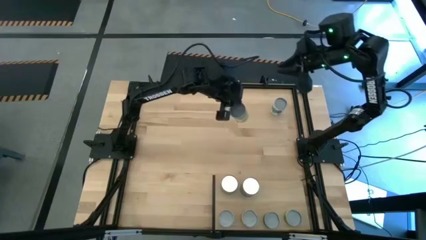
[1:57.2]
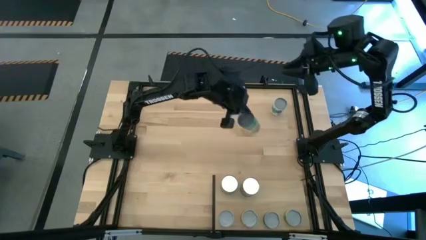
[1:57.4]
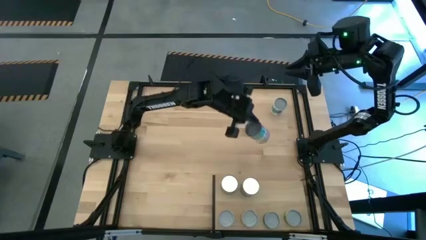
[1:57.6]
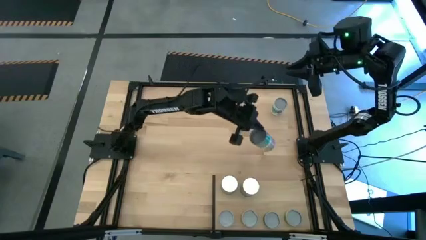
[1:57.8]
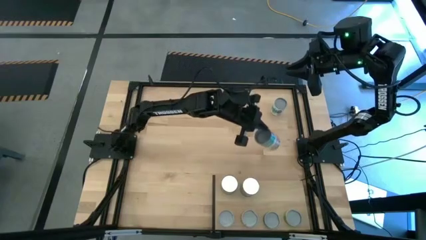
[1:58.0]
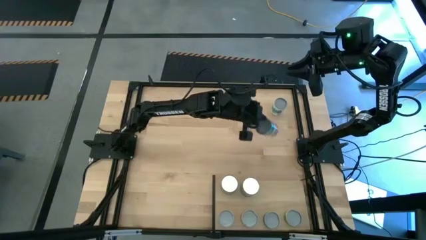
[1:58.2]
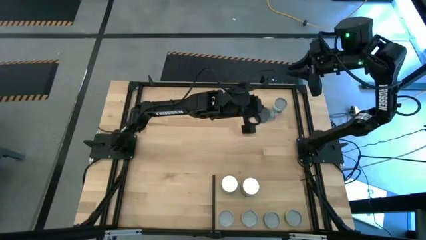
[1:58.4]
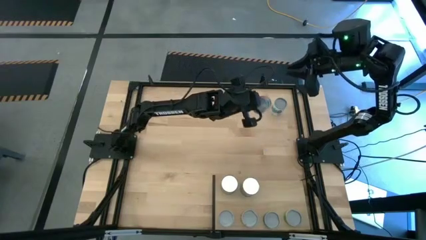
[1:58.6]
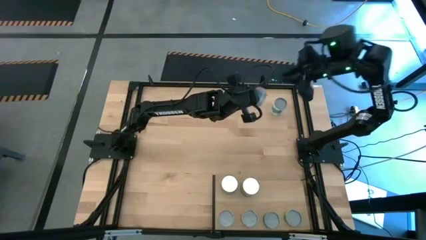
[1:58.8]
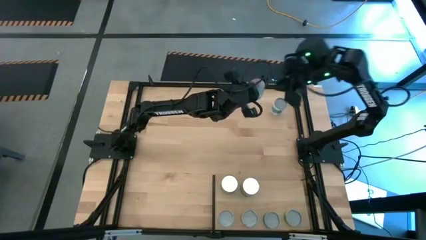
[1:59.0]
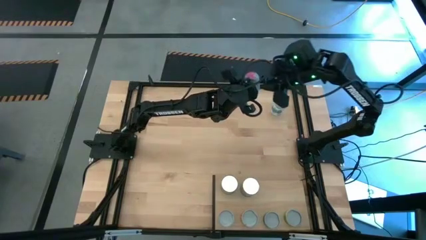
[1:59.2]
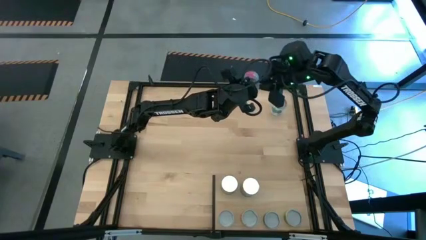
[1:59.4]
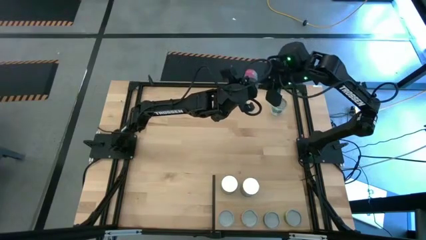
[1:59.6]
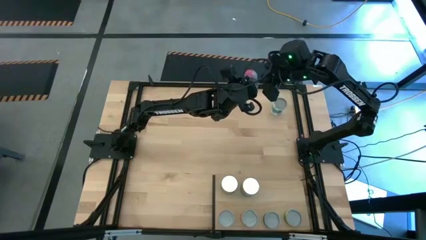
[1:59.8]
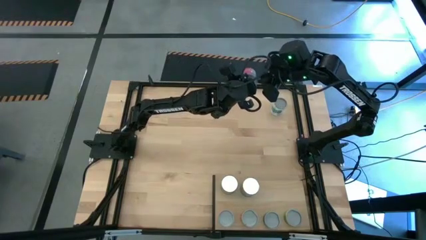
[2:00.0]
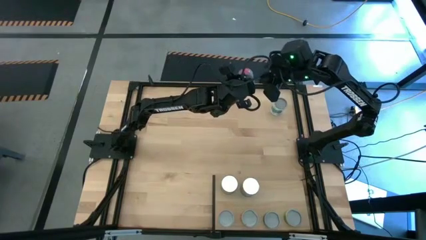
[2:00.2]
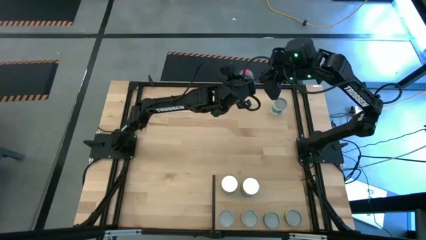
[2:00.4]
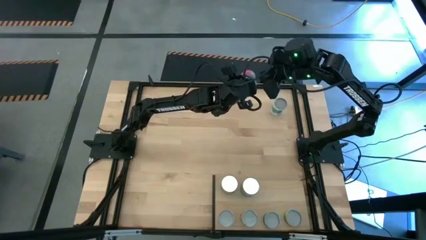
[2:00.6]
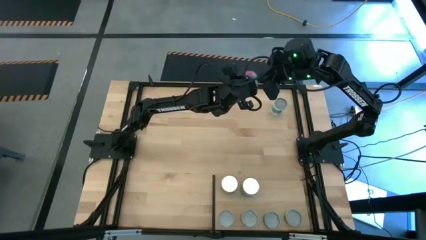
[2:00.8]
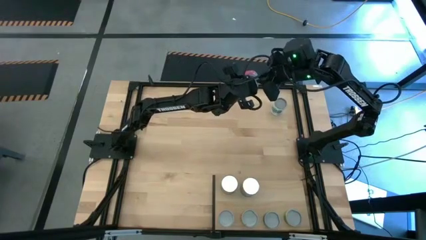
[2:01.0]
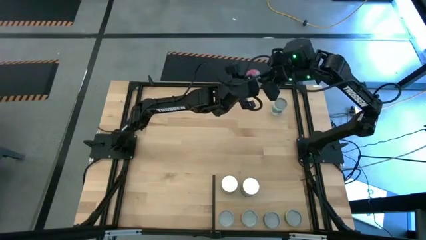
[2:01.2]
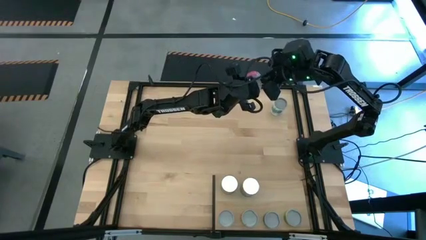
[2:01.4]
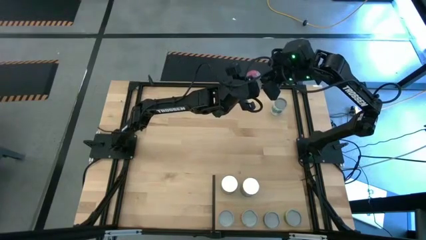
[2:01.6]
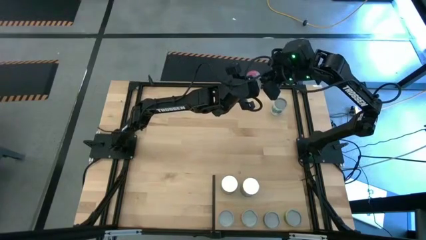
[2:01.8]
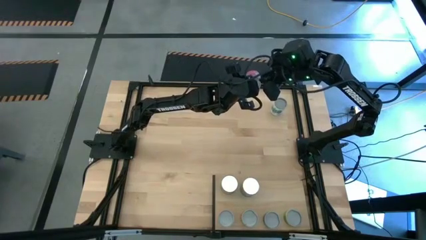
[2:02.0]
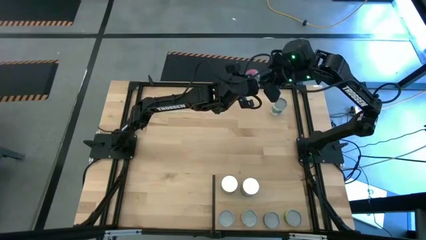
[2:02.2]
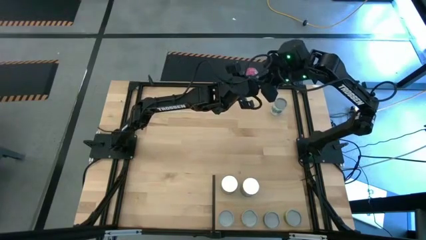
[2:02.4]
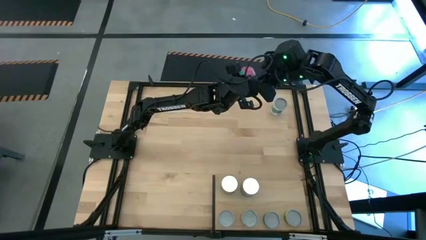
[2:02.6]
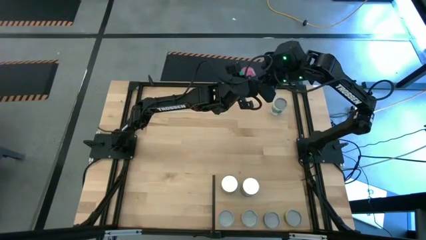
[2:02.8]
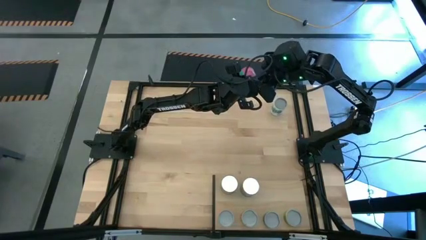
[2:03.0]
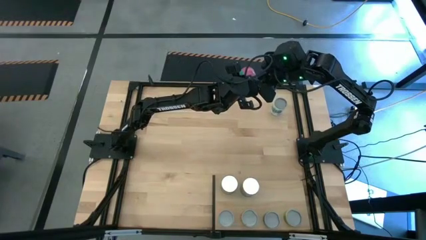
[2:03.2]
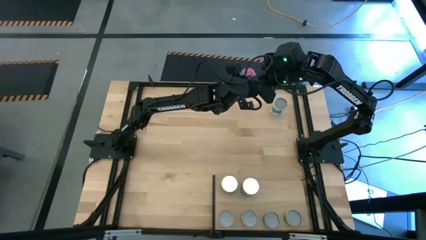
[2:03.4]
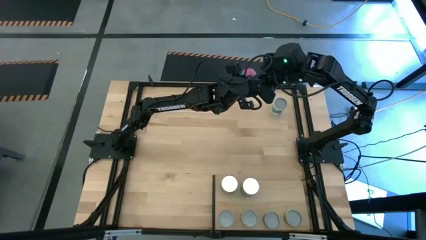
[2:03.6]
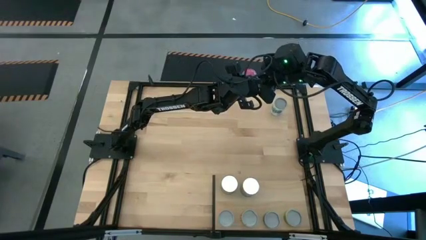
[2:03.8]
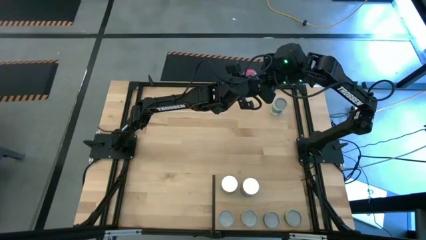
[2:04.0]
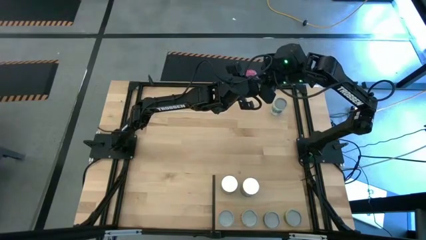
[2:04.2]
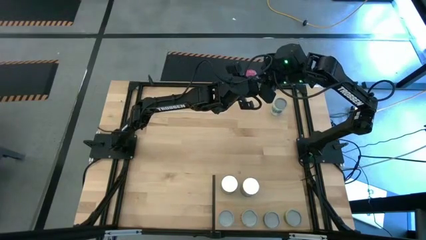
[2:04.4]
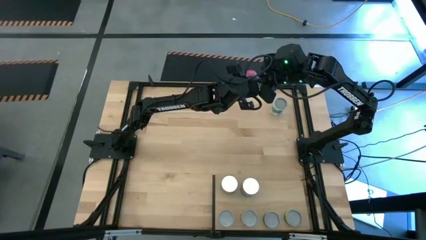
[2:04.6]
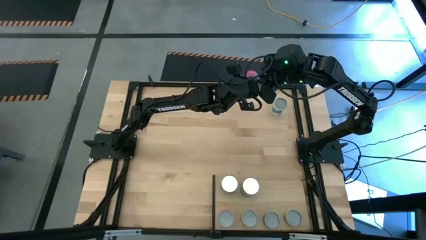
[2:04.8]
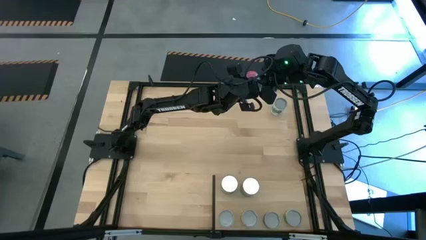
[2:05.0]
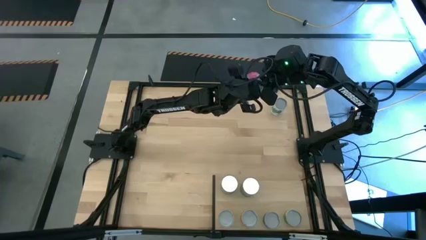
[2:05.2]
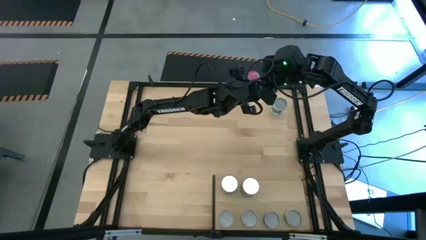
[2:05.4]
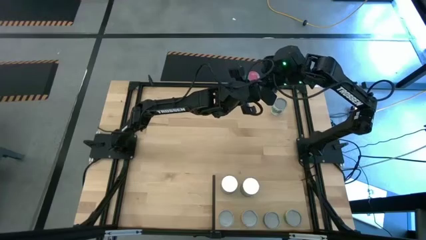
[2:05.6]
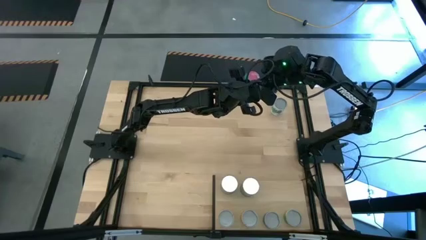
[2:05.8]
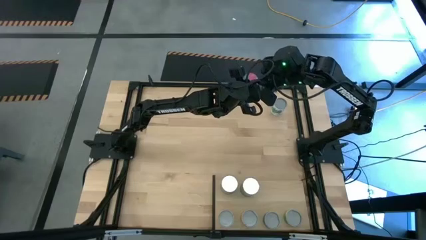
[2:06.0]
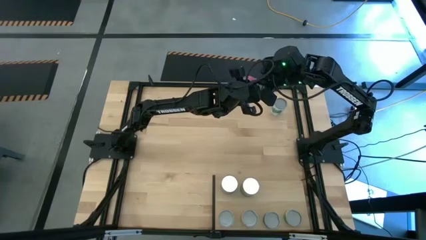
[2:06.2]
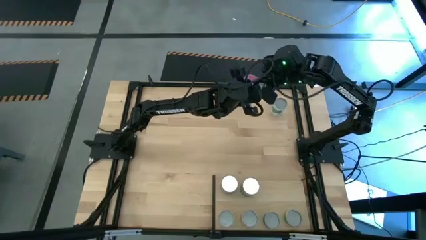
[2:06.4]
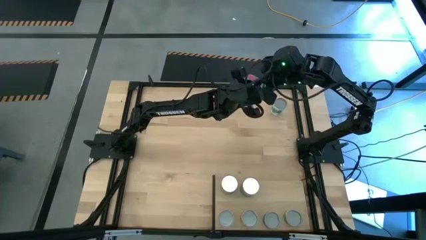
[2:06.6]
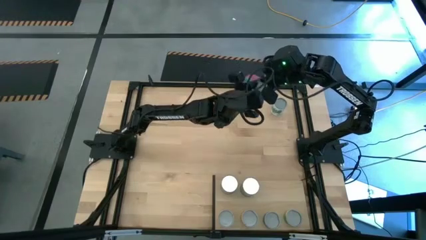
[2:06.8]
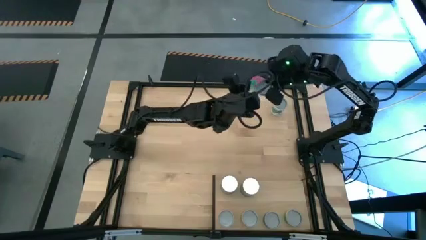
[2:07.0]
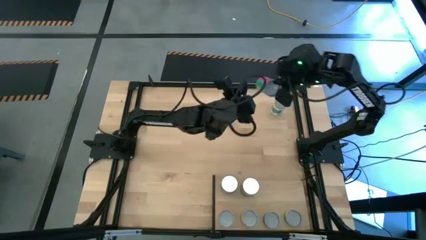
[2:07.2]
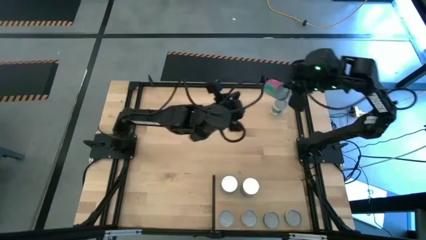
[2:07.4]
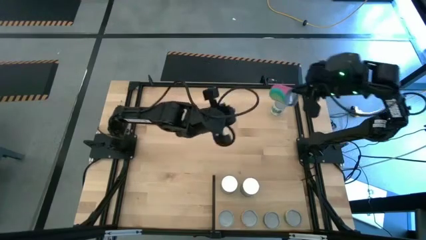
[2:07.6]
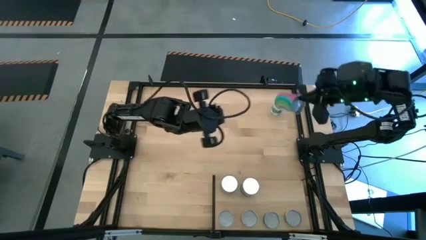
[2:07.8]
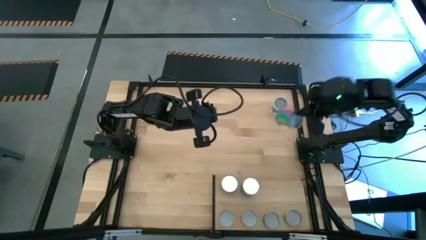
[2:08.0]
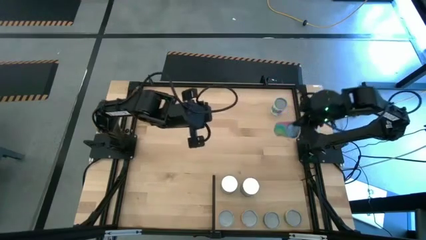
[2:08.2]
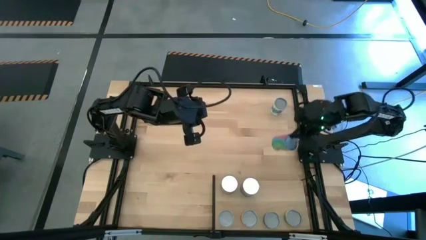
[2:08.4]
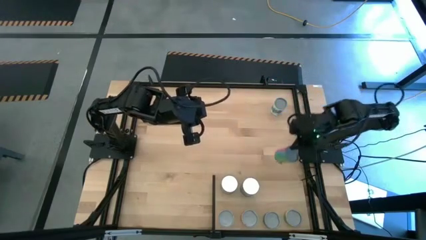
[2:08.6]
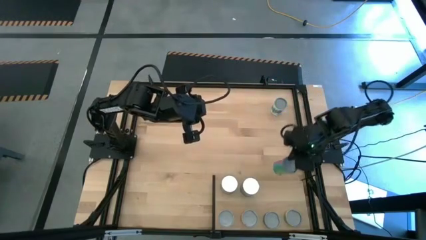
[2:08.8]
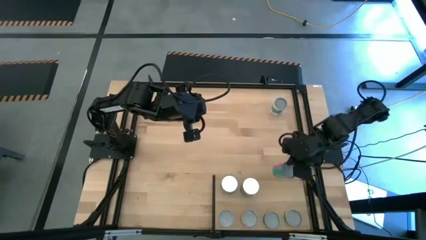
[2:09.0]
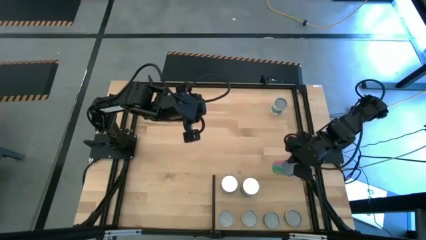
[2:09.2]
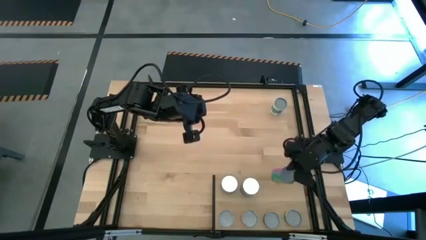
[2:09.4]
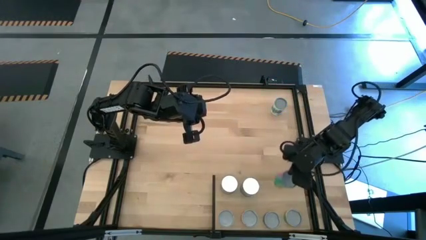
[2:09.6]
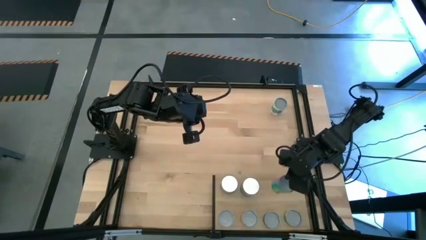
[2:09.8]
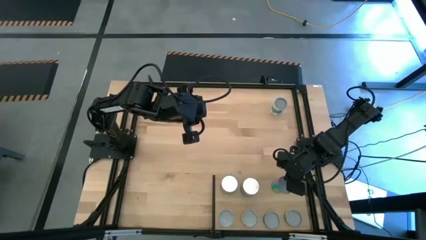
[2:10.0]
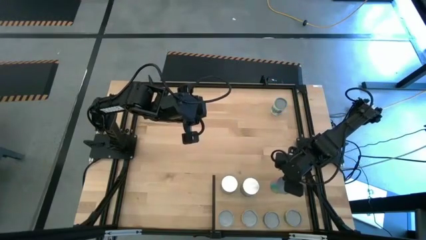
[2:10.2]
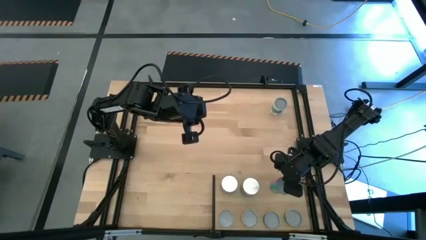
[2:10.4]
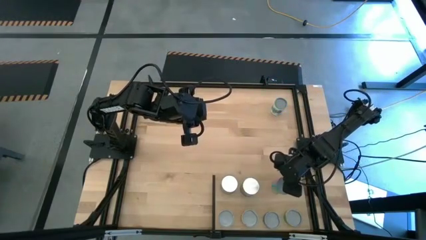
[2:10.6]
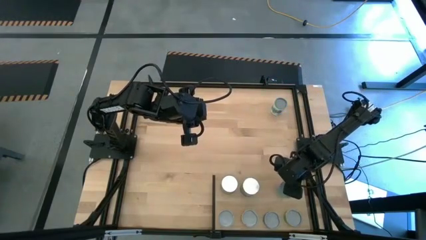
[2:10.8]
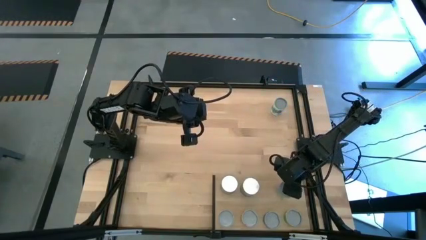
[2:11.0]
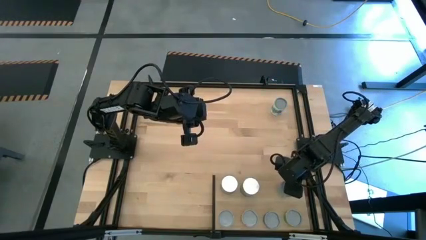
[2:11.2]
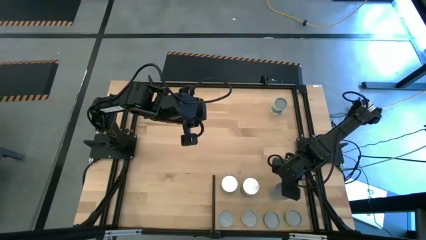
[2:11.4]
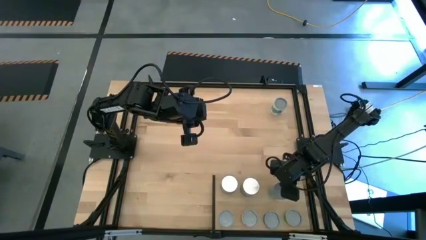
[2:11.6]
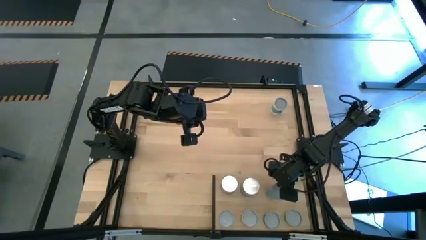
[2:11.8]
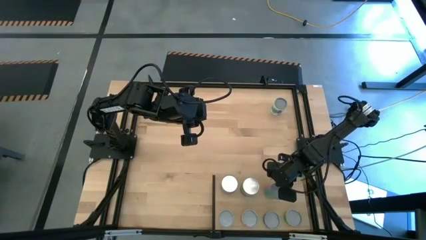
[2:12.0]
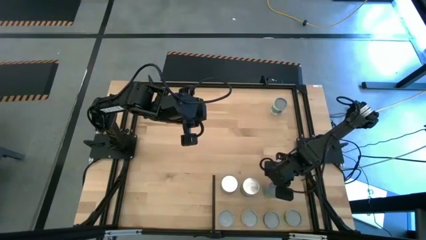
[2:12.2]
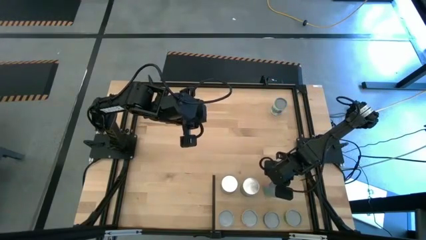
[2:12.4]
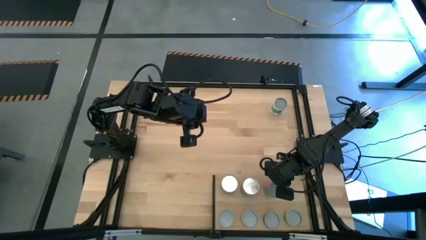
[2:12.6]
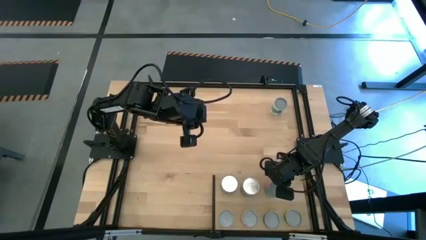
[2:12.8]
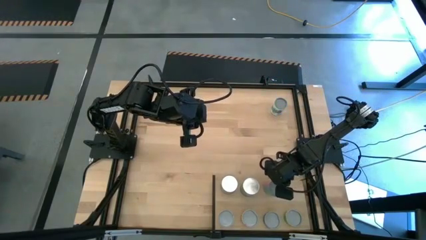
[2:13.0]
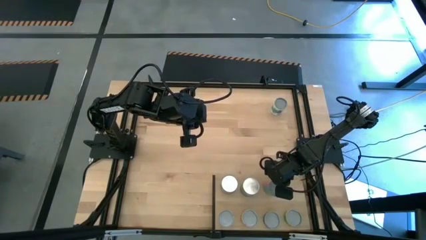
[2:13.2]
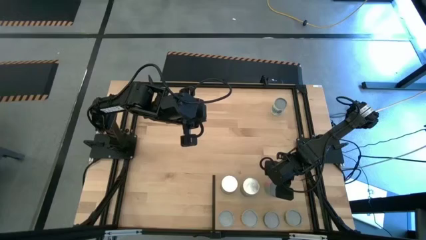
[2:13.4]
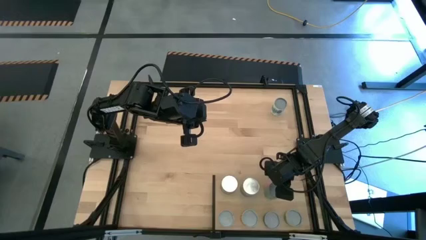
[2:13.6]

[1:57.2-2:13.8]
Task: Pick and place cans onto a shelf
Put the canned chicken soup on the shelf
